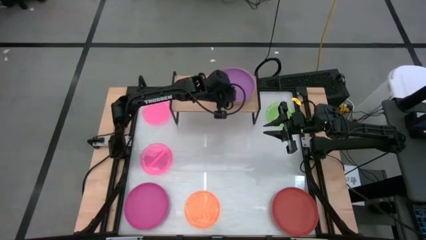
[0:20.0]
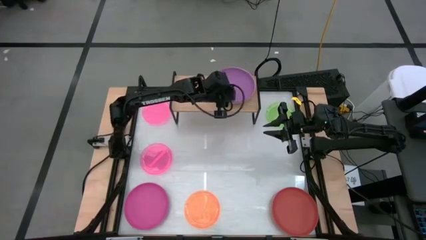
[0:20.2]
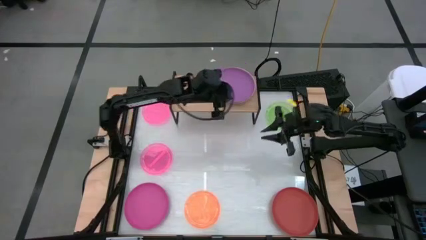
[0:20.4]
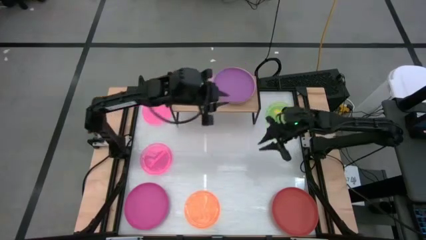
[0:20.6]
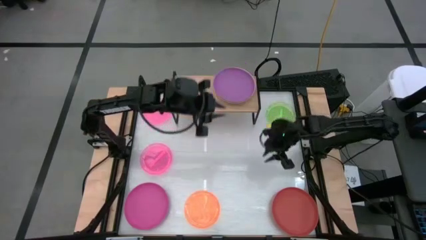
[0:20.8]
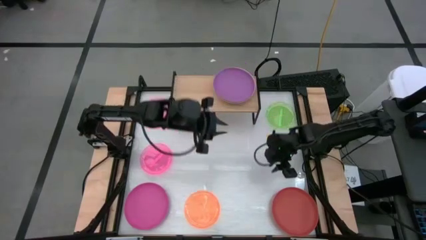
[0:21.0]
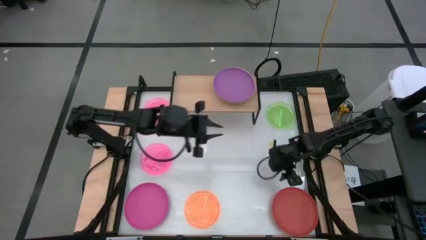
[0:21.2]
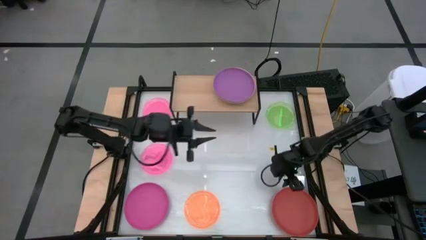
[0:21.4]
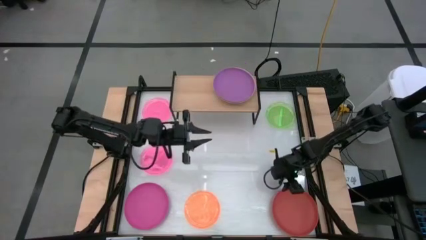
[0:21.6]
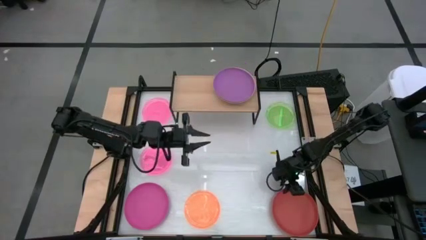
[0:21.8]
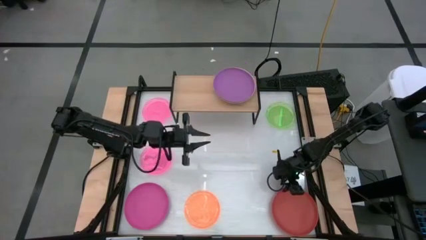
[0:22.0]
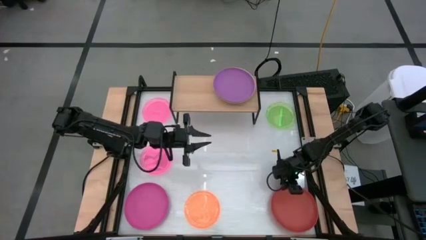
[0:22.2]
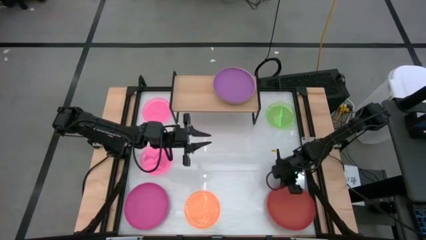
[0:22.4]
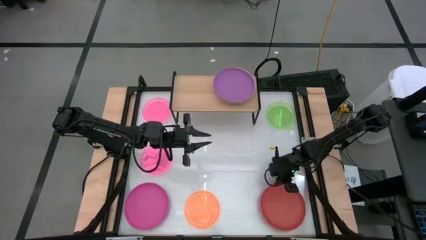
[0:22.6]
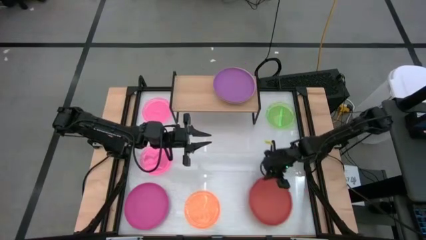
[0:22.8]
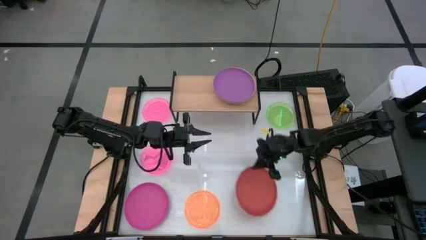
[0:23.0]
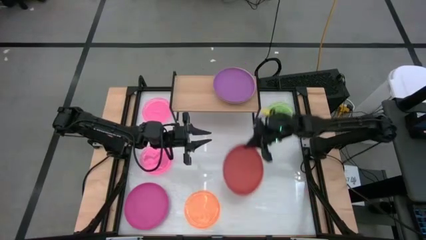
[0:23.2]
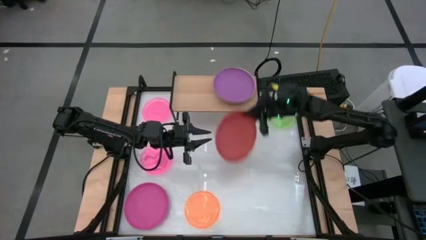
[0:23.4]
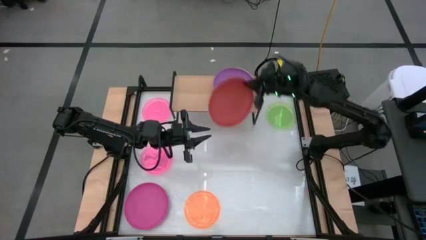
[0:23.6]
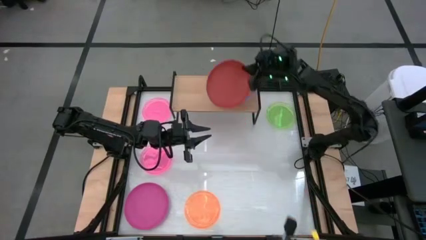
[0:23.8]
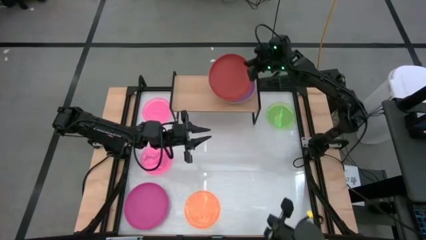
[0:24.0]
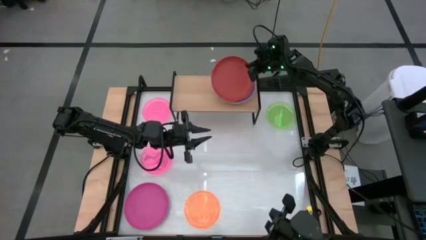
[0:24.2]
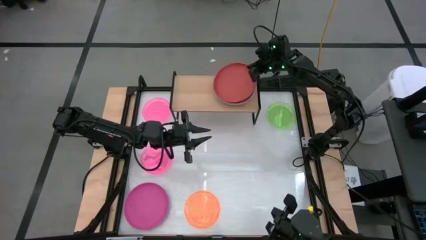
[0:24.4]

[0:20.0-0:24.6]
Task: Place and stack plates onto a shelf
Stack the red plate on top of the violet plate on the shelf

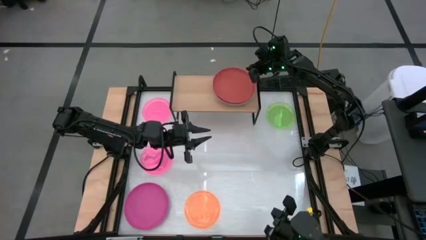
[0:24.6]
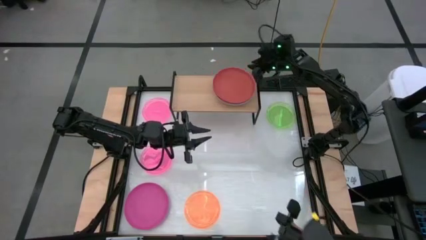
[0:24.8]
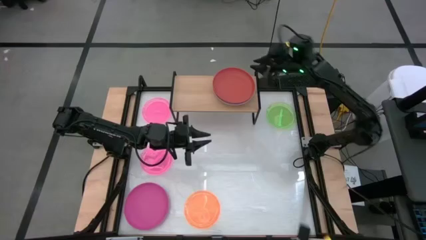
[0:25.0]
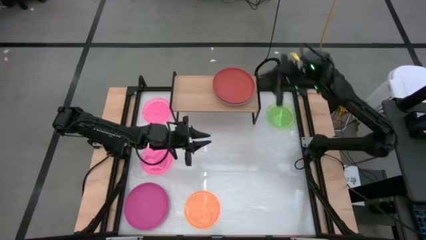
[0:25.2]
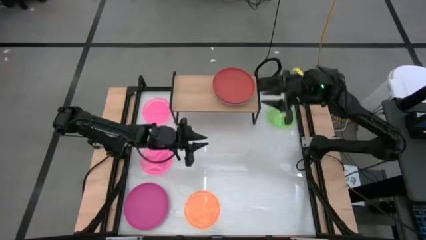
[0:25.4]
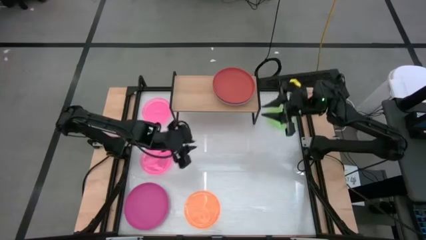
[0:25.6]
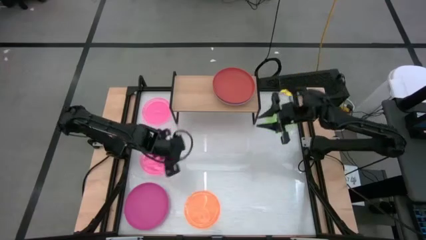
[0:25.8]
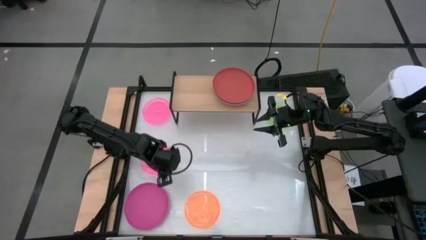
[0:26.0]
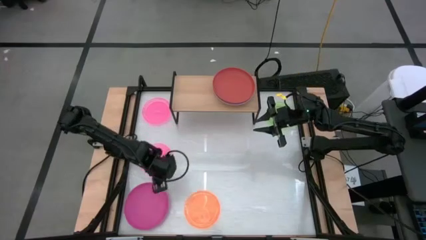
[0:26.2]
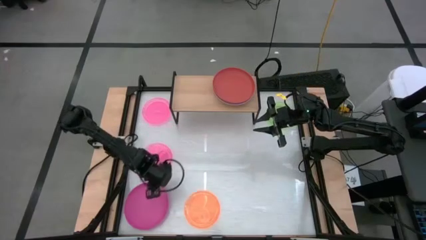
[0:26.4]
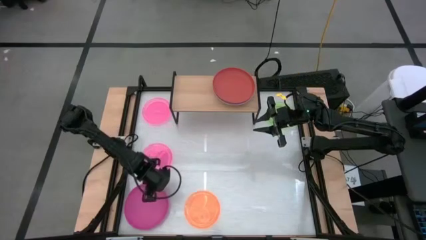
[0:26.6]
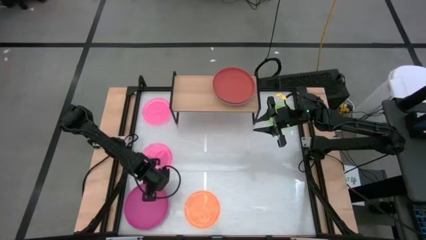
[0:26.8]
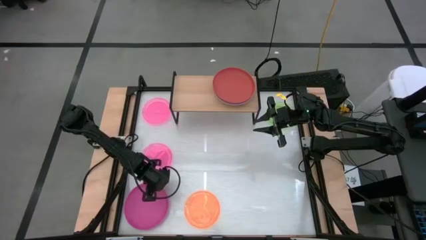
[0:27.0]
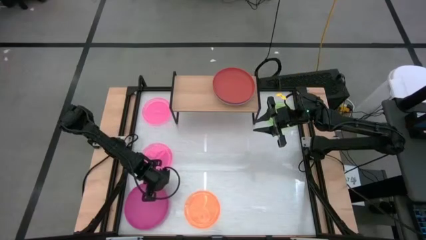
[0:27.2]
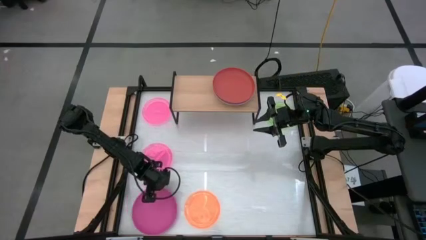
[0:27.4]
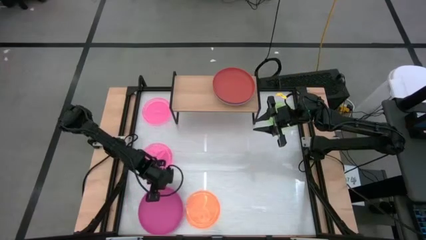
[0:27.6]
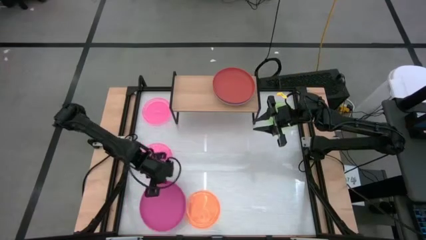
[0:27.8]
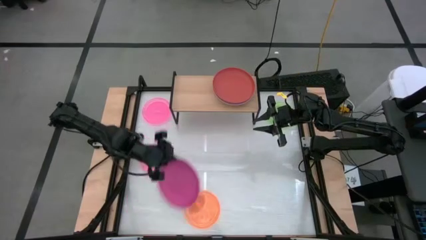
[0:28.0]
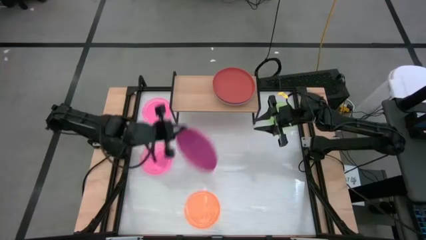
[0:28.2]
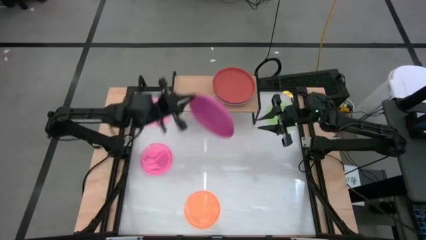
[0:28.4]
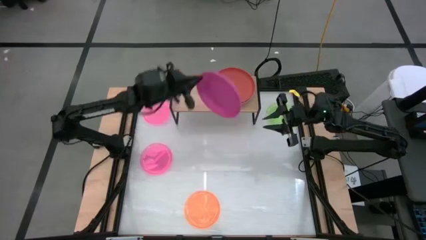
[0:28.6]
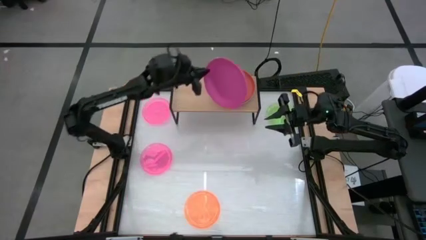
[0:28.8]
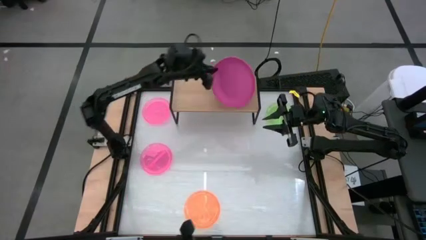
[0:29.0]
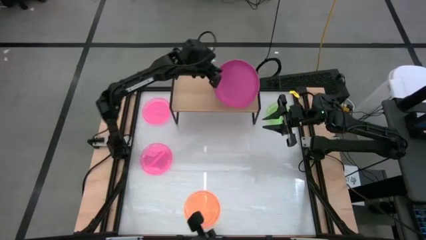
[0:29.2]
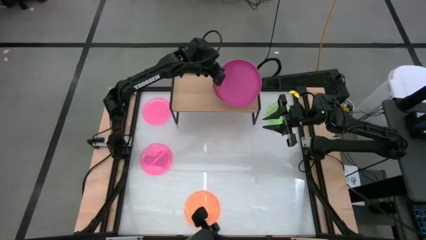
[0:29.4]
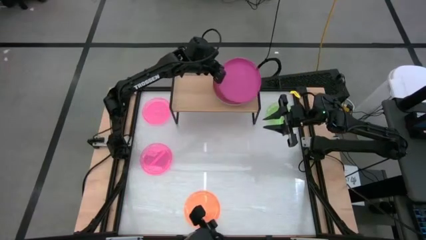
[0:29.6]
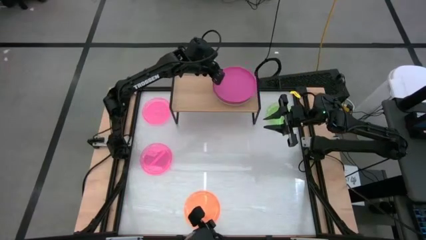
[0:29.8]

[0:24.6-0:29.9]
Stack the pink plate on top of the red plate on the shelf

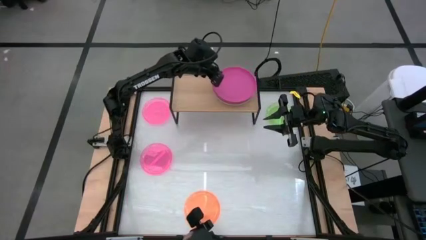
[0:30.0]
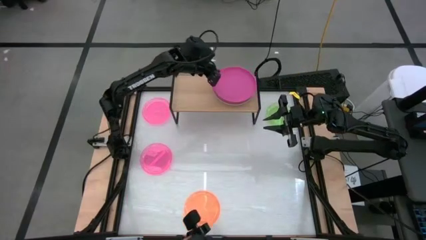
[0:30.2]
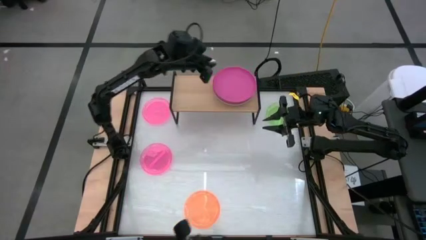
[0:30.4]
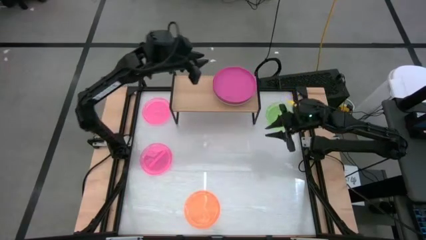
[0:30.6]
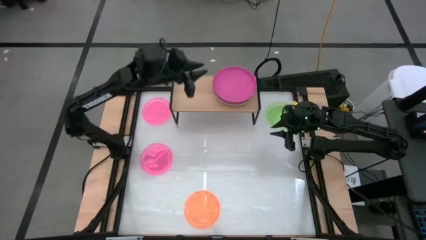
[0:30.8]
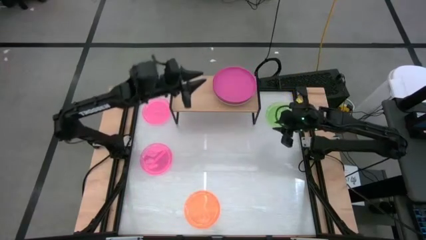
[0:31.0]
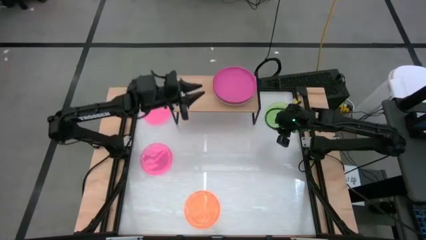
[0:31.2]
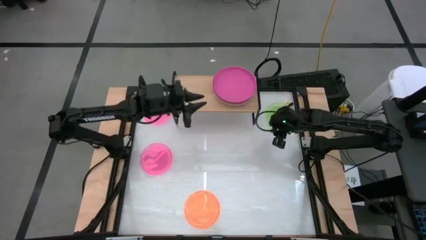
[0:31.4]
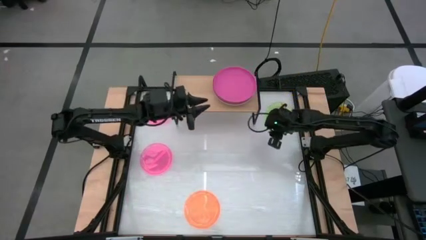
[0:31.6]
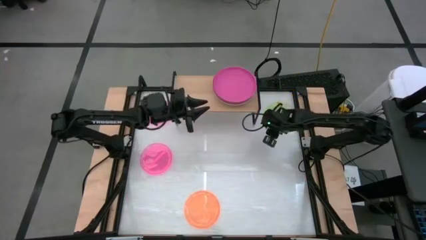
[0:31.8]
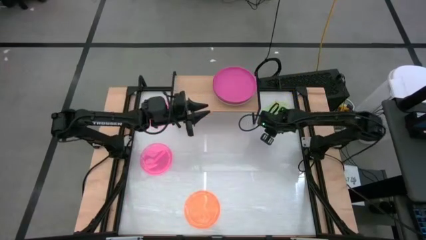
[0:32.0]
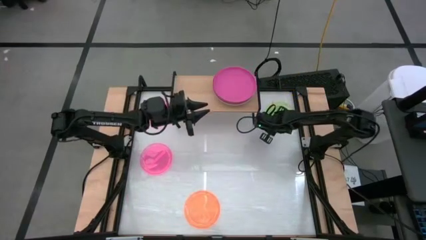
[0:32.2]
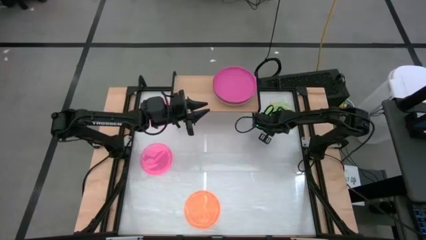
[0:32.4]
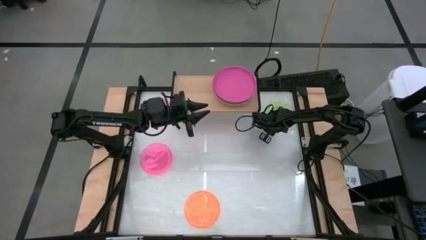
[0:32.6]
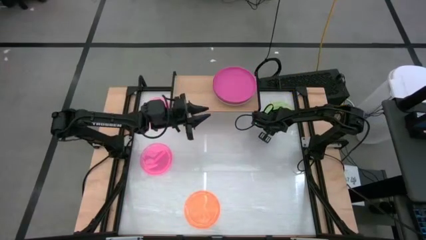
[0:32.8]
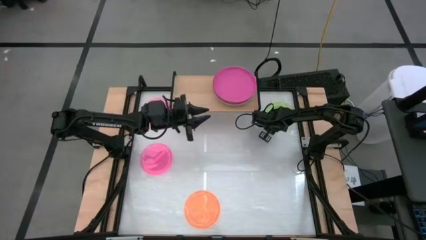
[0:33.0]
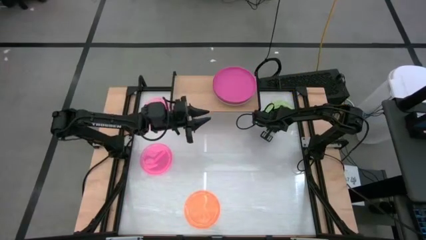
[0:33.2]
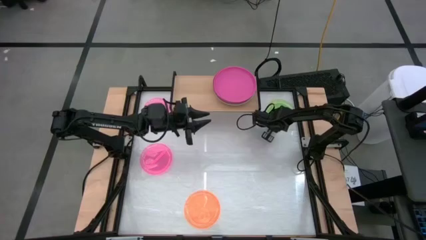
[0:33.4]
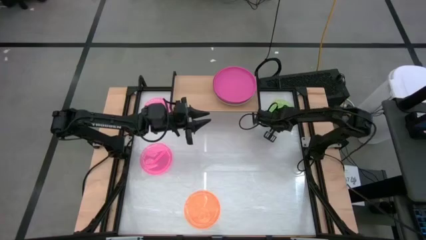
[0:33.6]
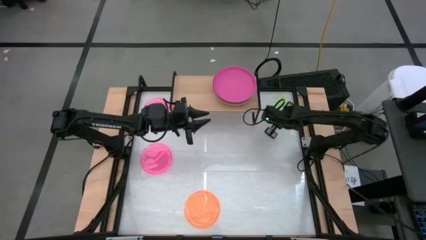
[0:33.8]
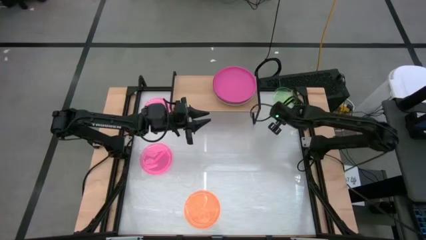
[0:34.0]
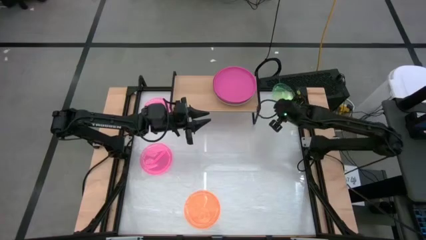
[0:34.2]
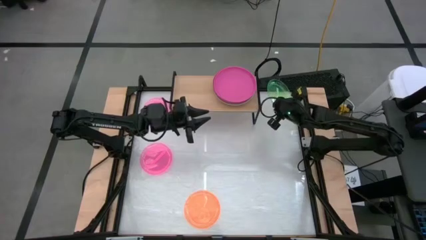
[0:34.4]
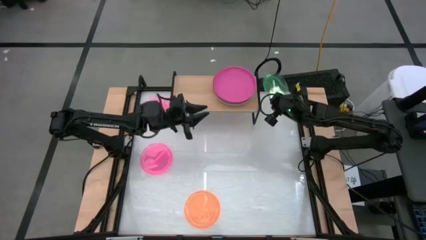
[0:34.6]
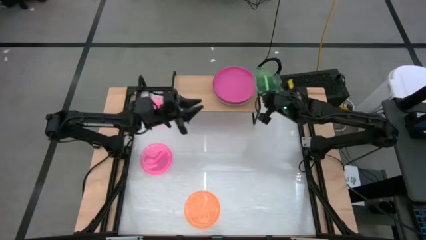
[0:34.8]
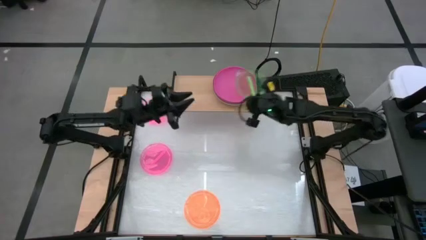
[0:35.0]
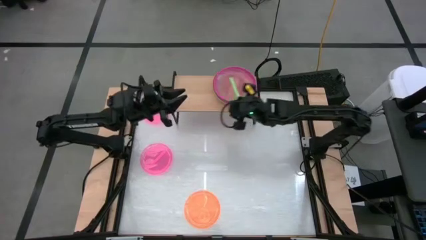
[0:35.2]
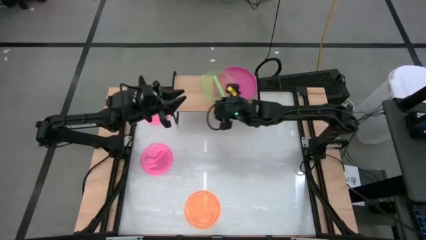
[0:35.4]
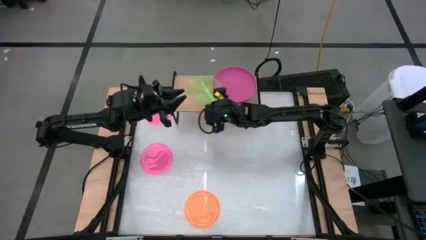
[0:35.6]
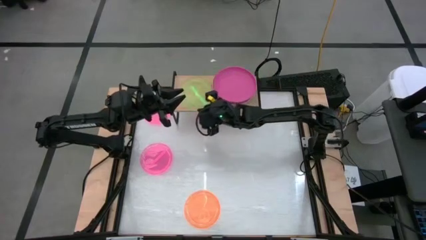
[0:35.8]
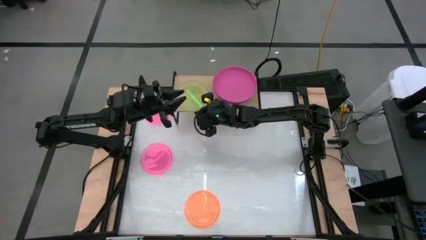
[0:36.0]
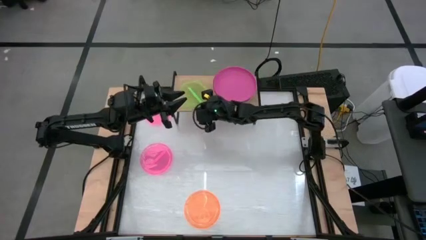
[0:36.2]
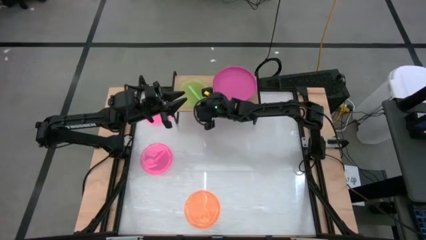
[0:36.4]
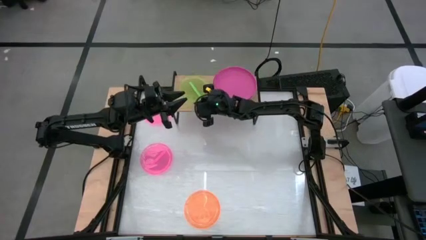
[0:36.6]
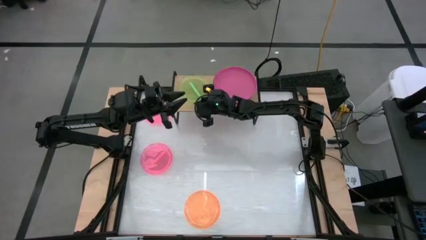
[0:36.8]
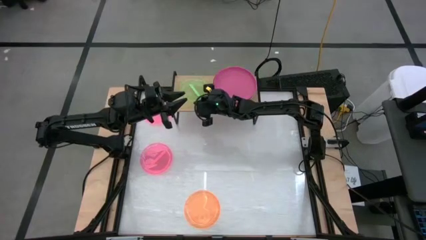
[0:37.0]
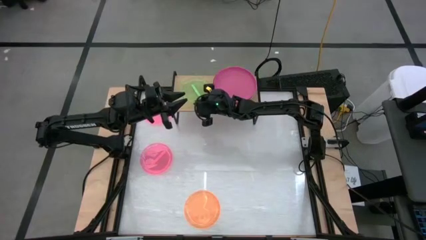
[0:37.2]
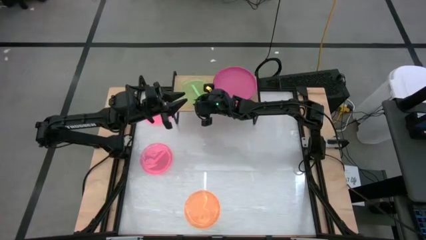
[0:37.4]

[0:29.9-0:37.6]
Put the green transparent plate on the shelf
